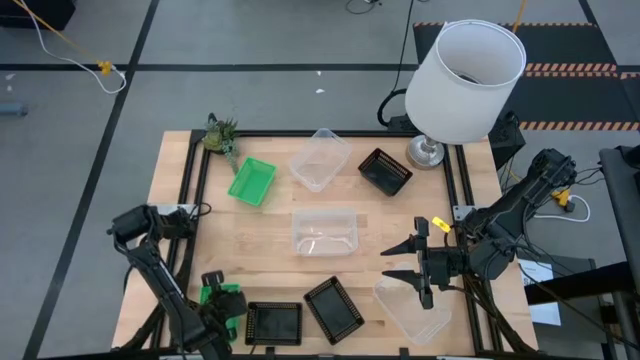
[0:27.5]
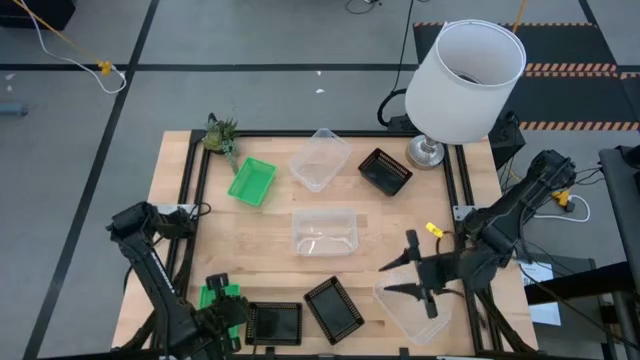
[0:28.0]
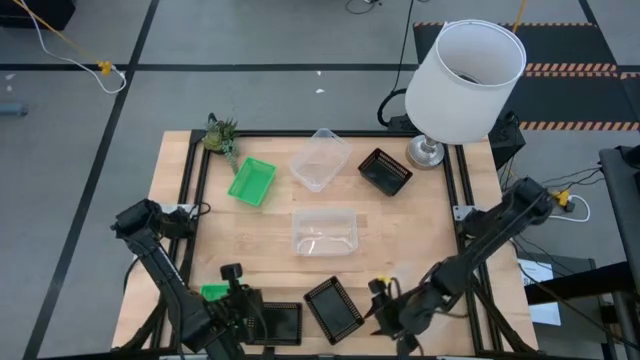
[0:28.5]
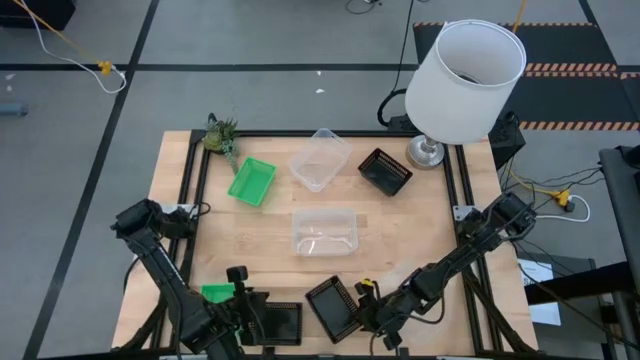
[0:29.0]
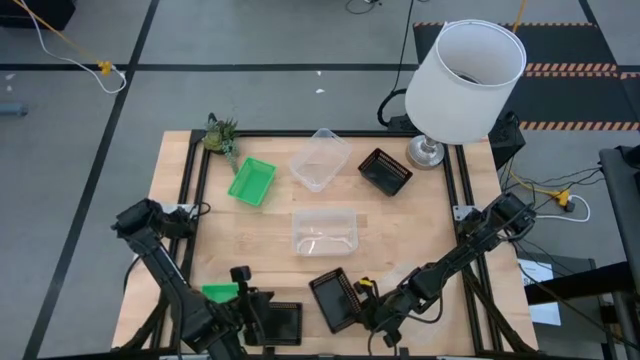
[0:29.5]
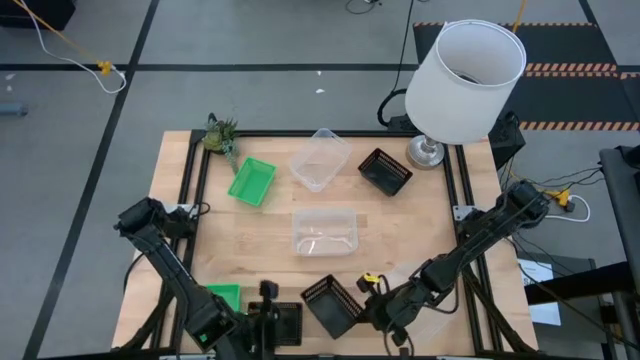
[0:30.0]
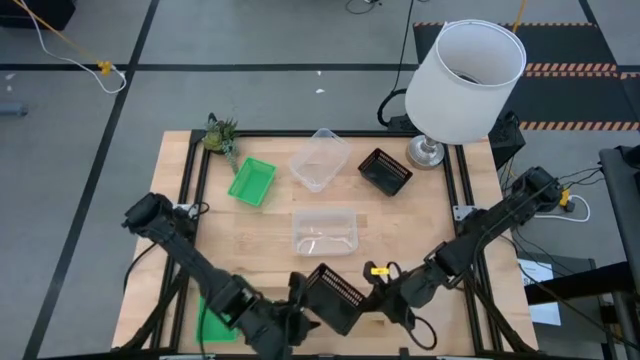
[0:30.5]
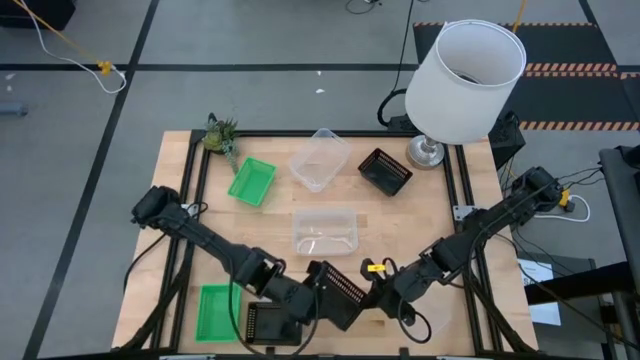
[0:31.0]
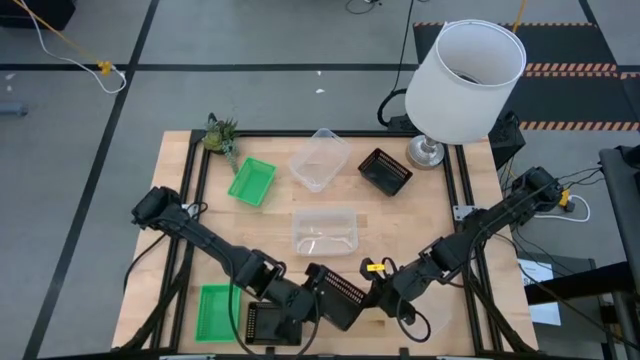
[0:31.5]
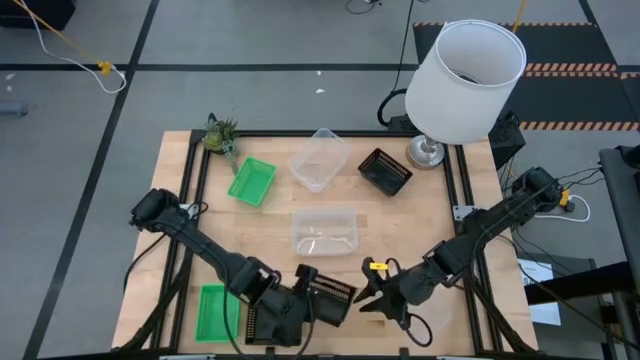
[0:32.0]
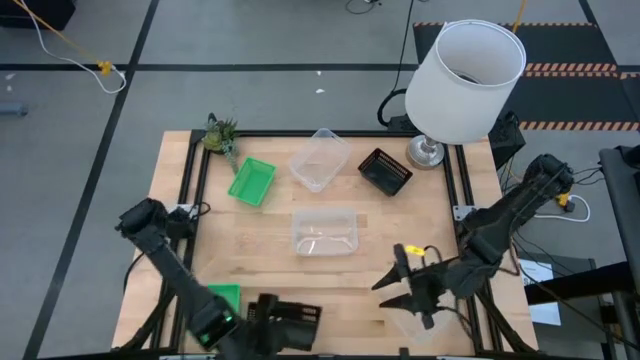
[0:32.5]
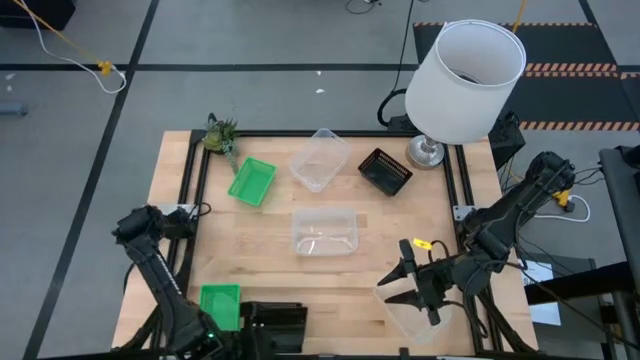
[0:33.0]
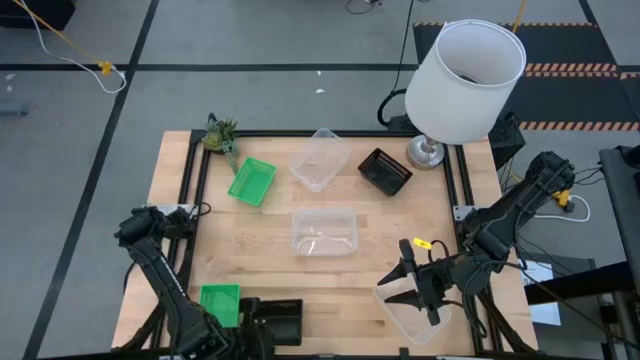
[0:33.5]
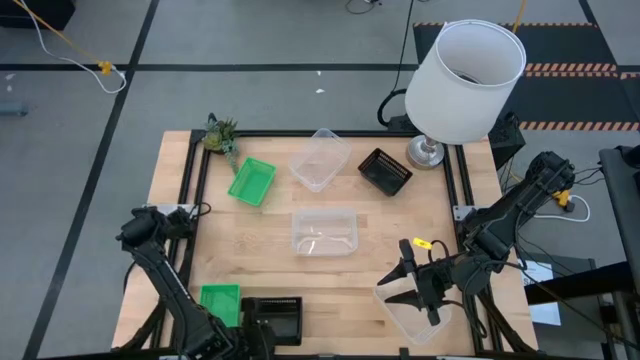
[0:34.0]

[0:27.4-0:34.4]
Stack the bottom right black bin on the bottom left black bin

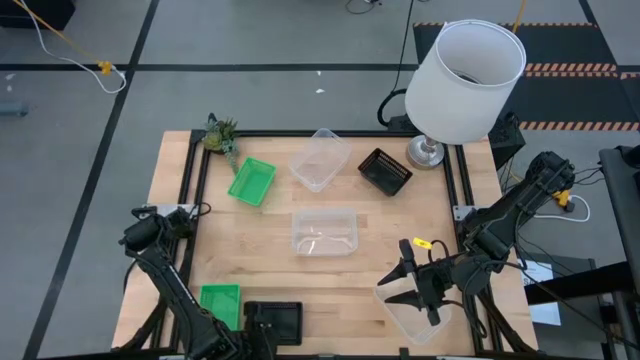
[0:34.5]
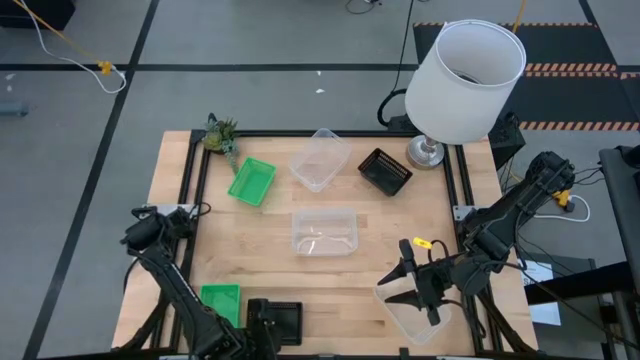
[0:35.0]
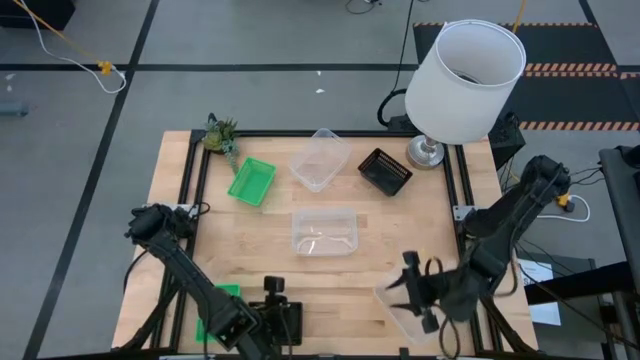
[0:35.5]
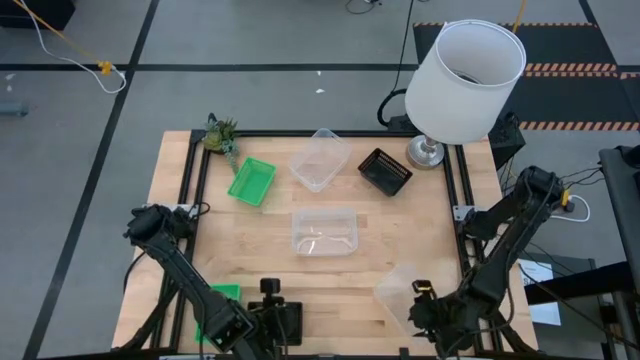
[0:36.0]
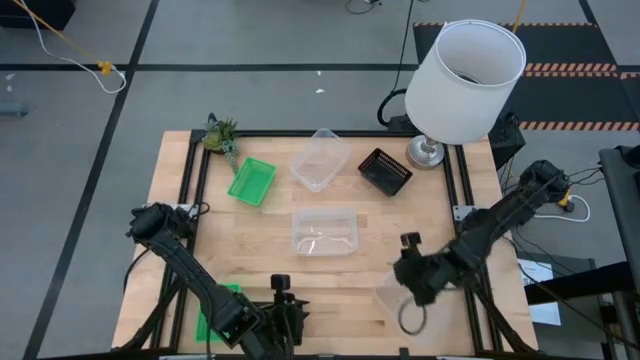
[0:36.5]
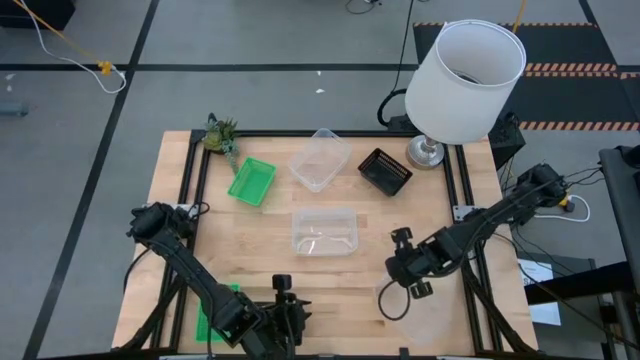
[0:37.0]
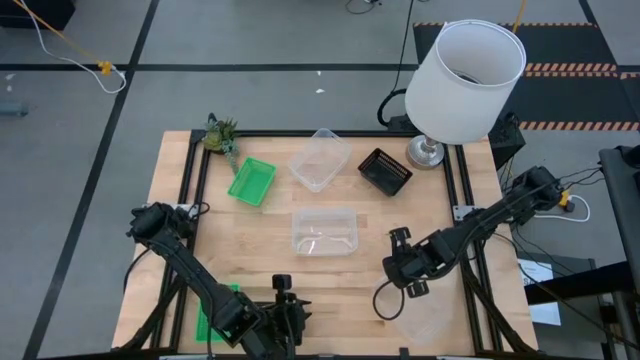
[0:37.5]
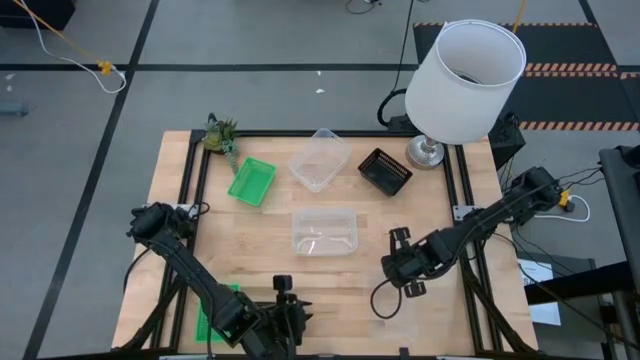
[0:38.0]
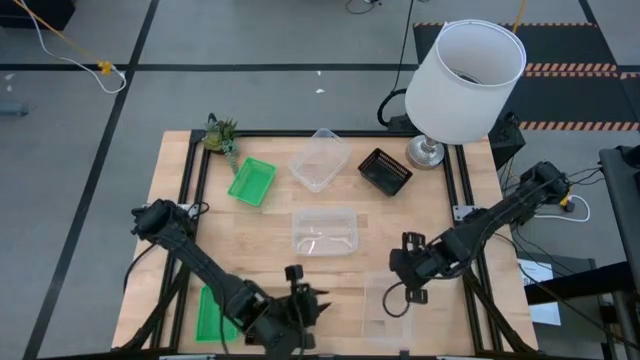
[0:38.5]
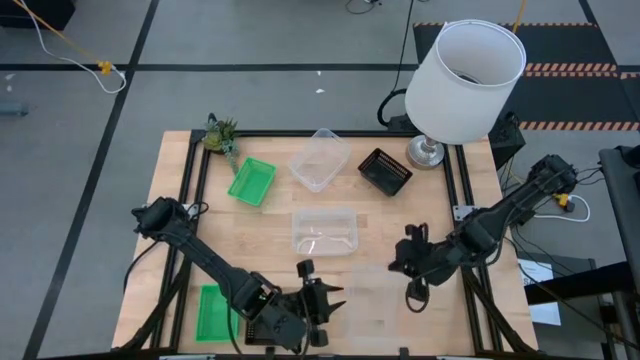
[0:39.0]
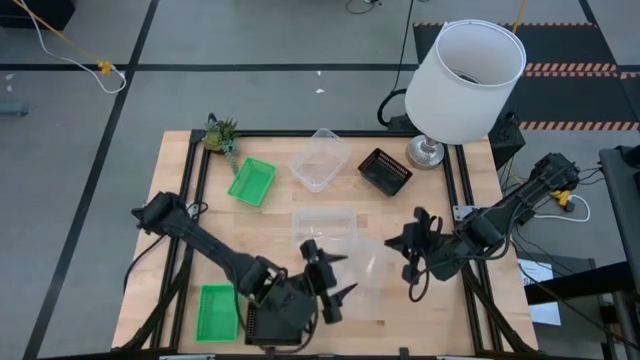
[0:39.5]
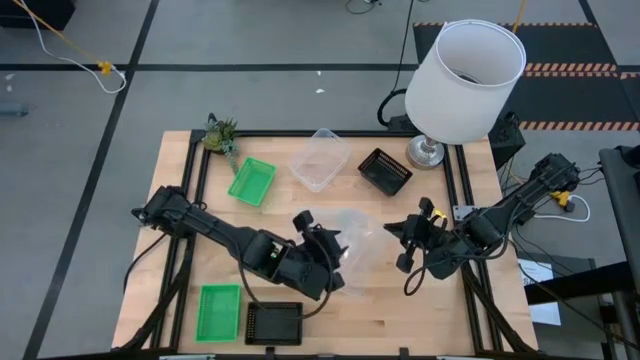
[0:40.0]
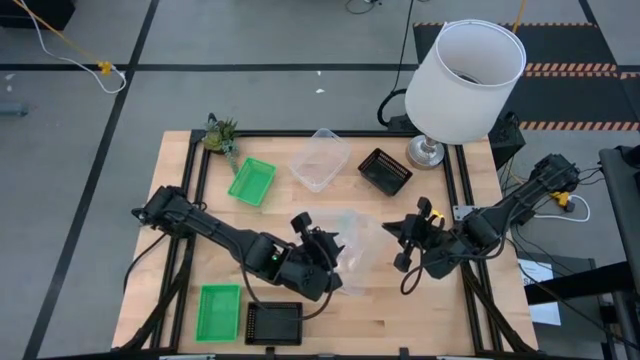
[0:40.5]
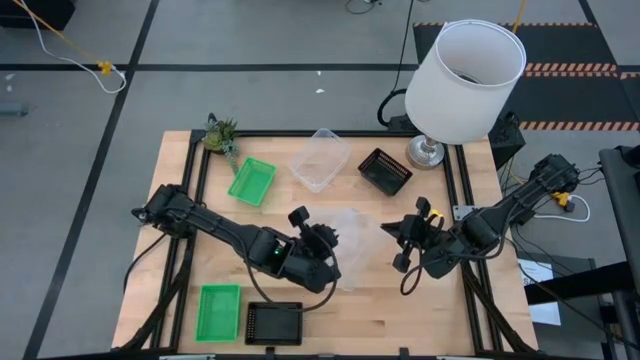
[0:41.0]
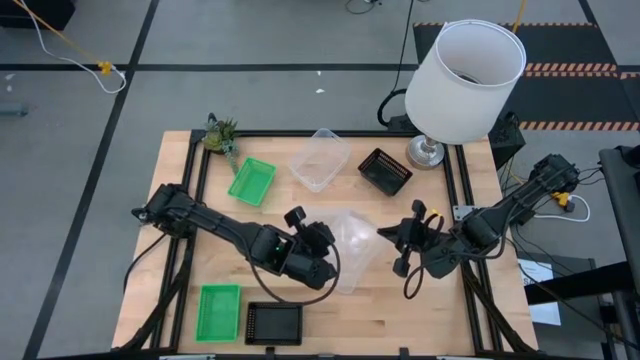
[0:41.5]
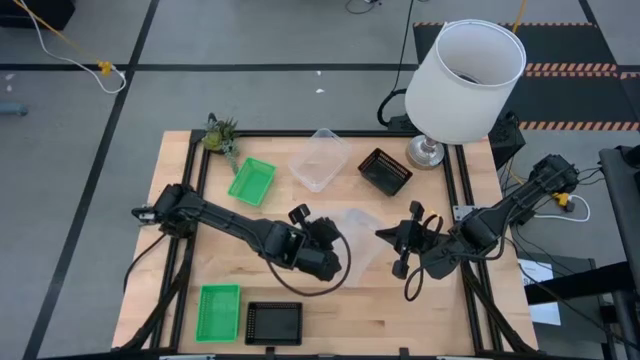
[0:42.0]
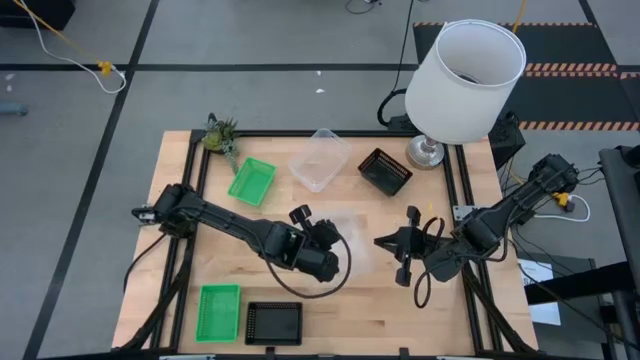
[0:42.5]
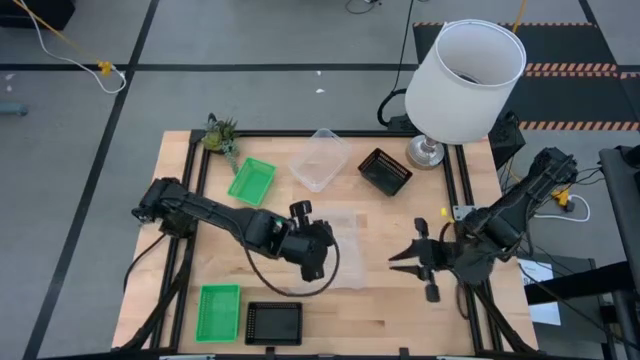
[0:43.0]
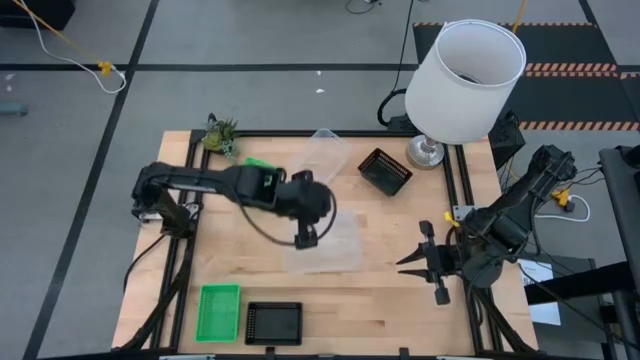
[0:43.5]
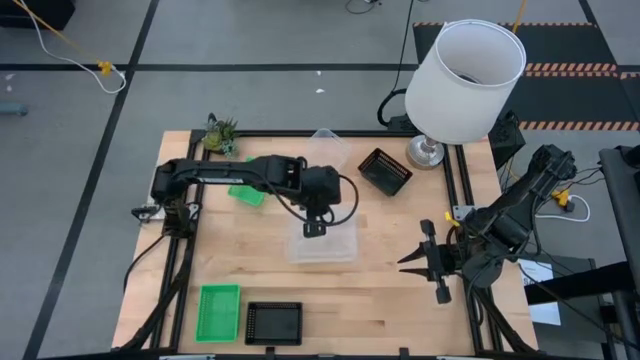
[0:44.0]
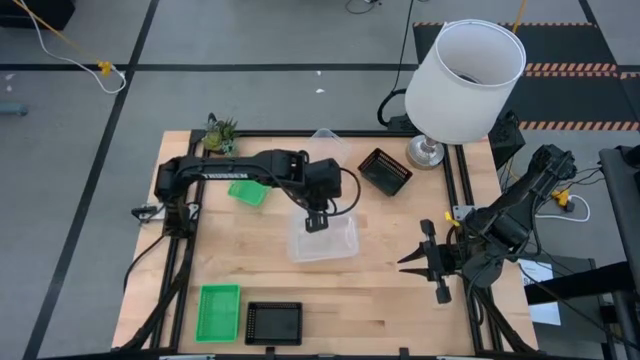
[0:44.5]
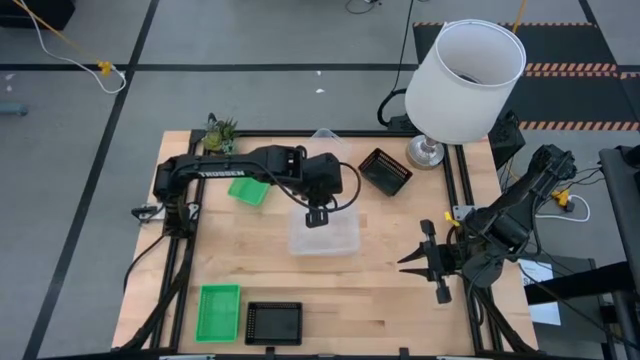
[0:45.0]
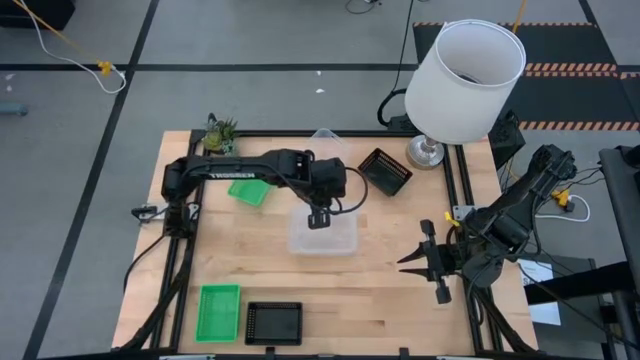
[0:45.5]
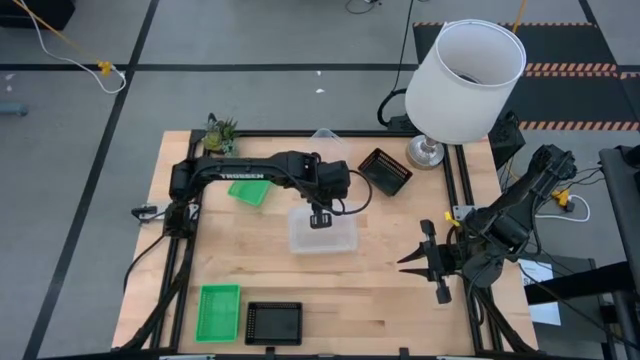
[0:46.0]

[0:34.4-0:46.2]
Stack the bottom transparent bin on the middle transparent bin
